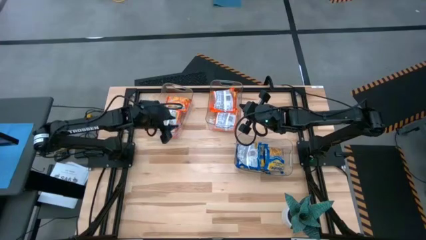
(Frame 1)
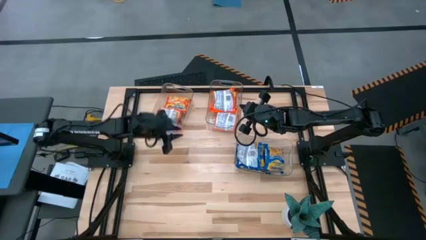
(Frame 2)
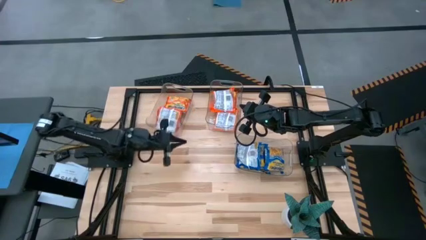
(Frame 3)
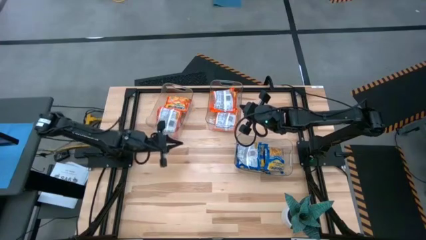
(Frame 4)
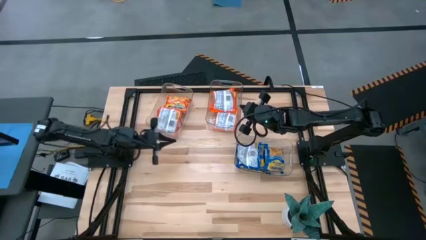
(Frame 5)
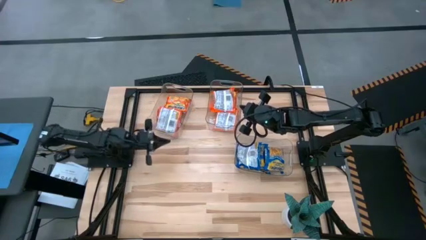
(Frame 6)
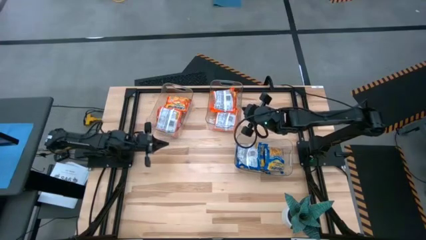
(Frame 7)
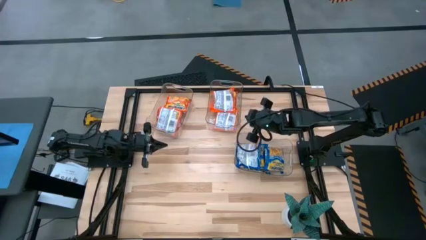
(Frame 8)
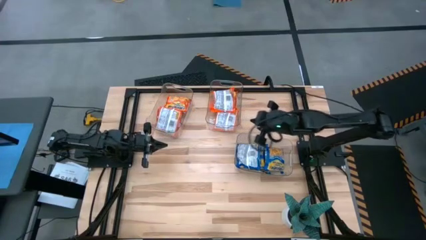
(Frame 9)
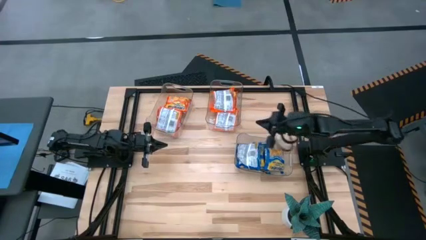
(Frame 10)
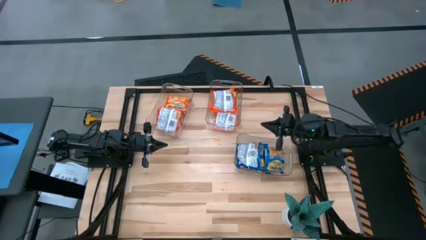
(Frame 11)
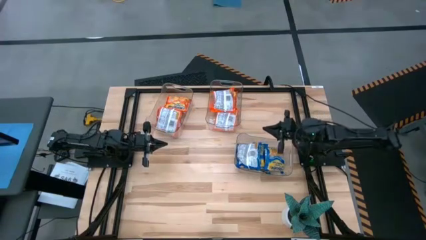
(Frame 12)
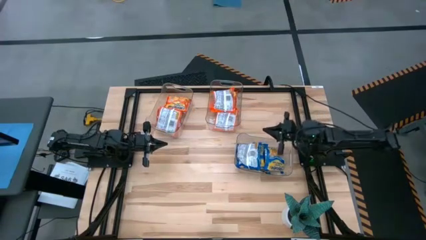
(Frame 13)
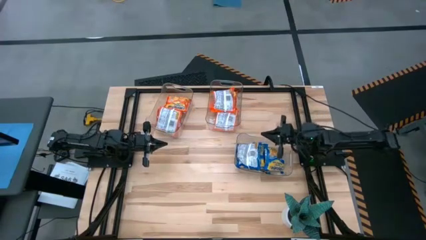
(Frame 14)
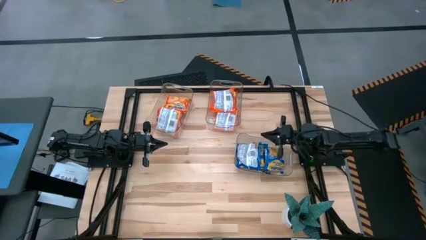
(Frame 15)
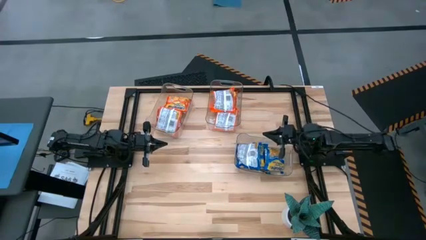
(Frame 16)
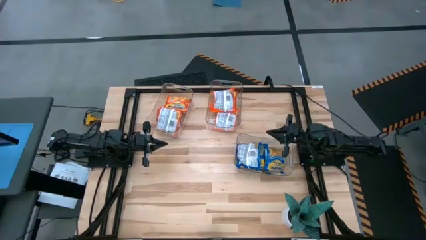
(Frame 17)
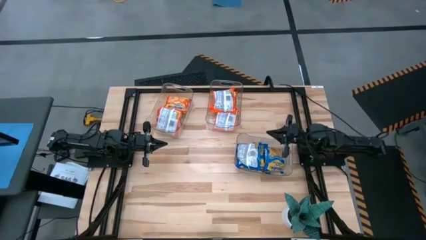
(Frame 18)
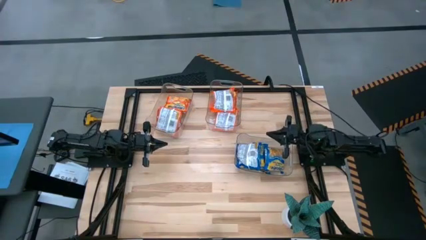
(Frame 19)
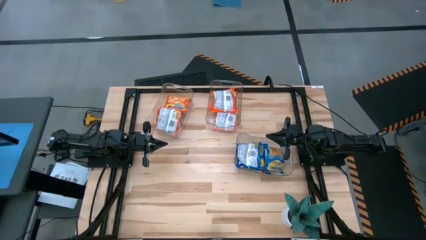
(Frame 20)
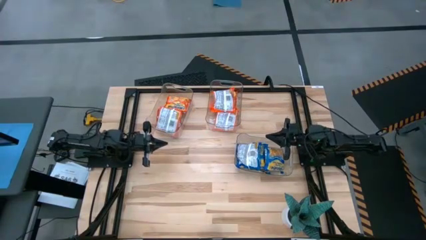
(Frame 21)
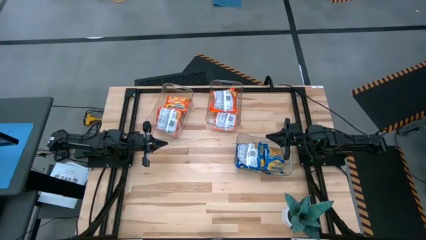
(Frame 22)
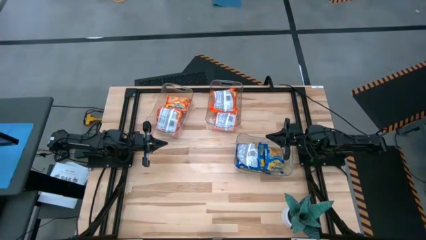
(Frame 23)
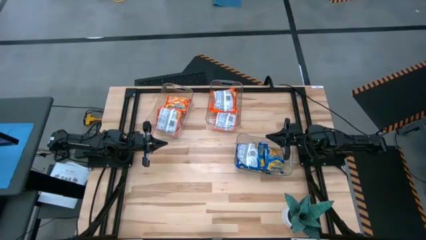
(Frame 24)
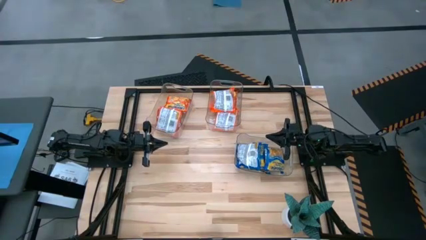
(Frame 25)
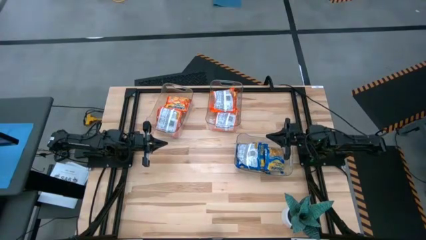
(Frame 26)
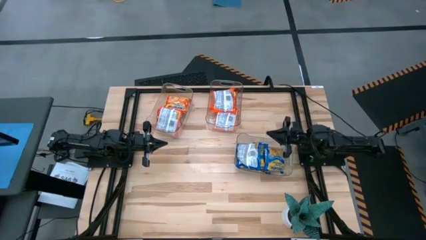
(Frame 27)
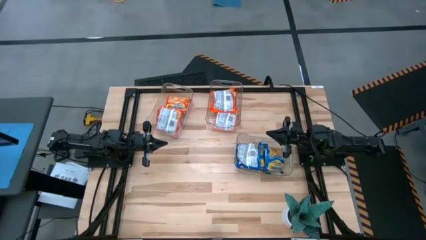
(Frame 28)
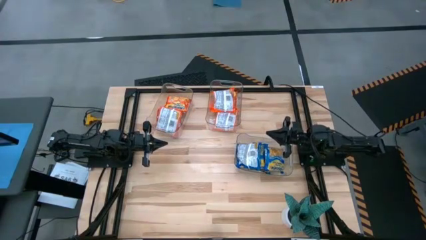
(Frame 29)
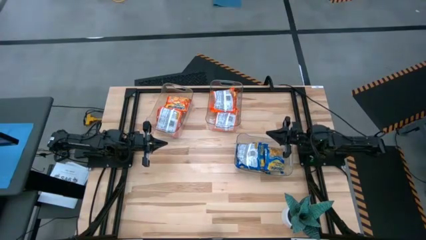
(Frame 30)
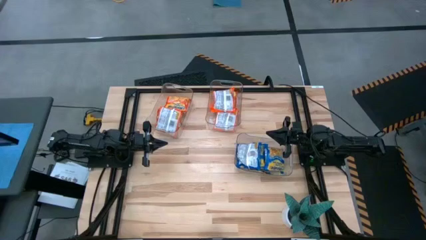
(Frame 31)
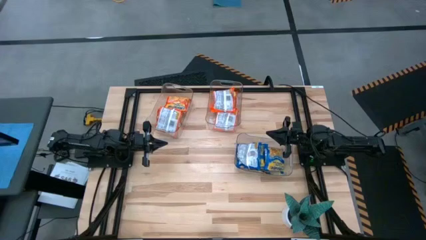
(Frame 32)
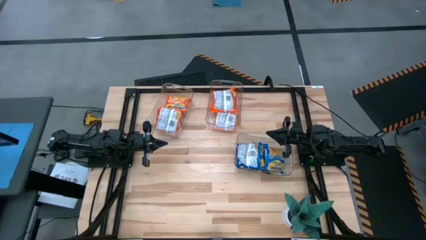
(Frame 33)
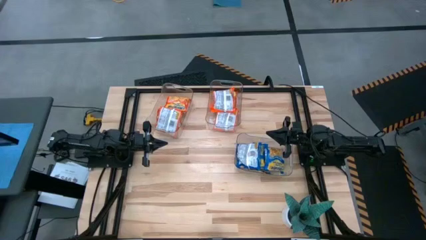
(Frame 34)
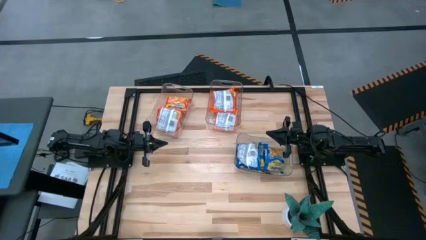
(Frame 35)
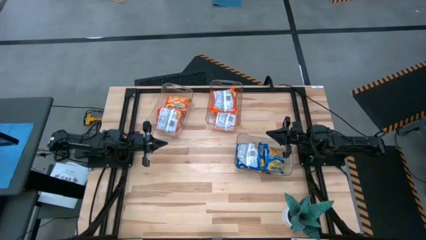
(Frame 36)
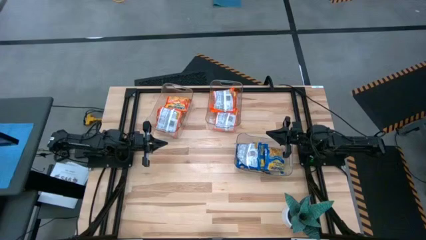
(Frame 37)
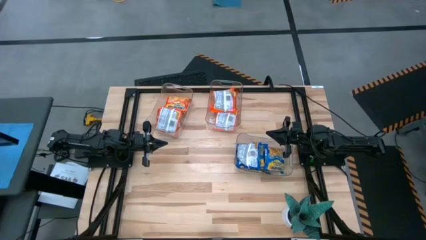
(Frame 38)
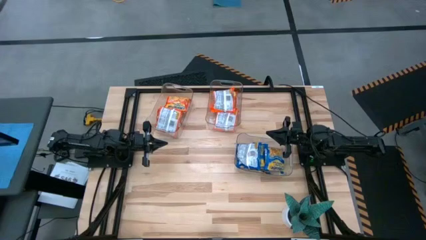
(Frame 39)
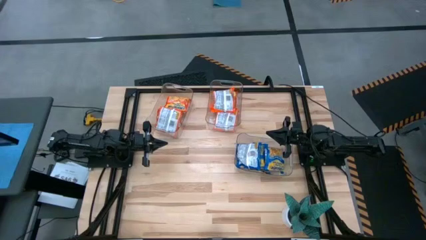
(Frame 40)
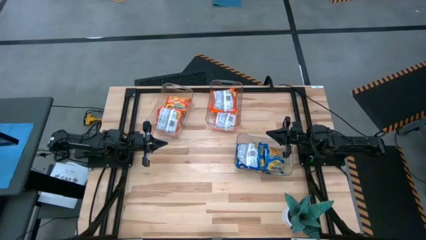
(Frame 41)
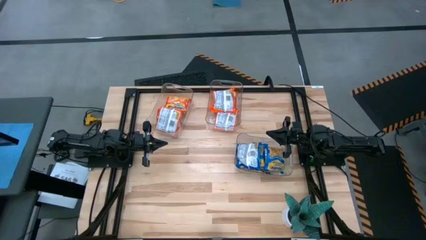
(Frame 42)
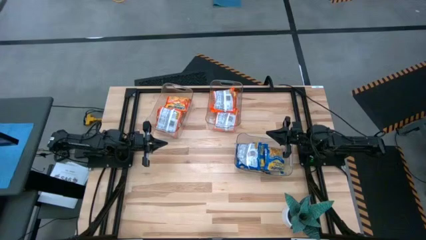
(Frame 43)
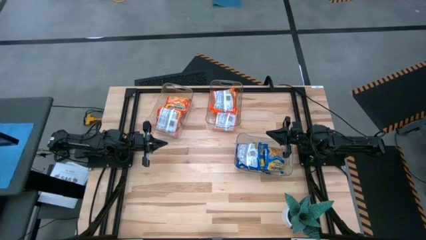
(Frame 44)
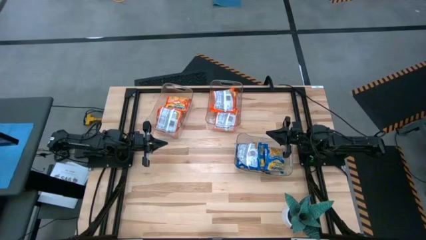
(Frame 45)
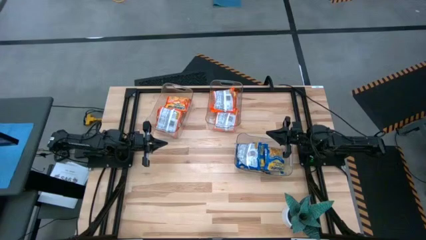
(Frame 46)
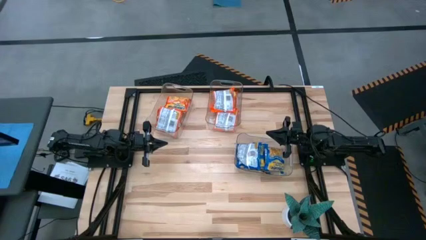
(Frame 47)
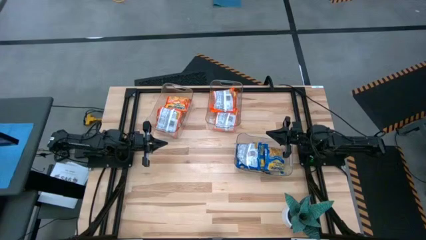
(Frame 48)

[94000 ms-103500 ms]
Task: Sort Maruchan noodles
Return to Home Position

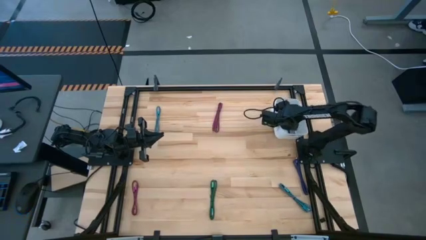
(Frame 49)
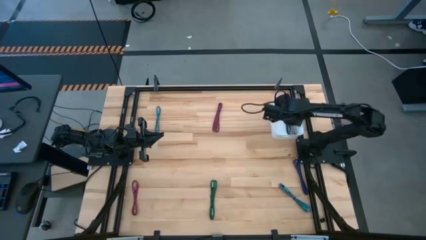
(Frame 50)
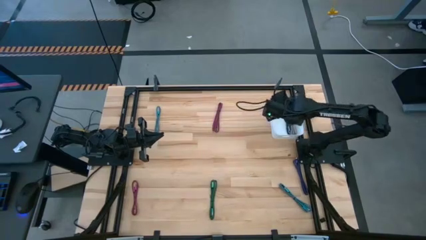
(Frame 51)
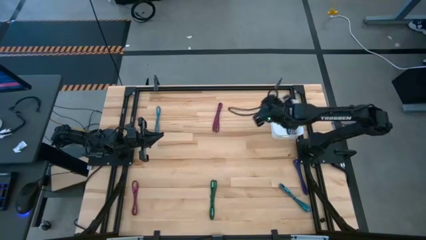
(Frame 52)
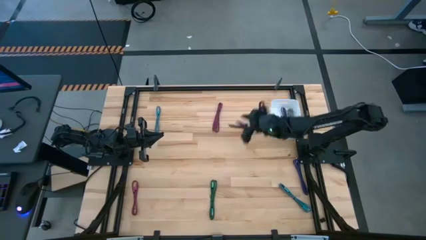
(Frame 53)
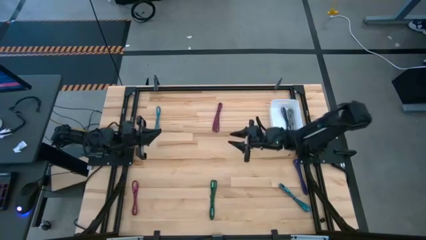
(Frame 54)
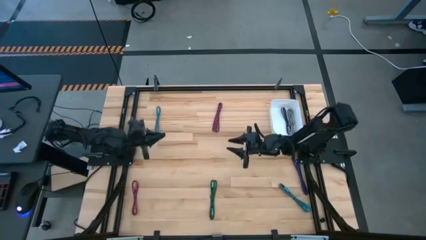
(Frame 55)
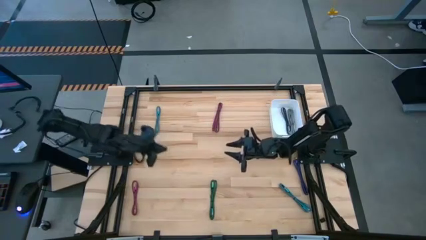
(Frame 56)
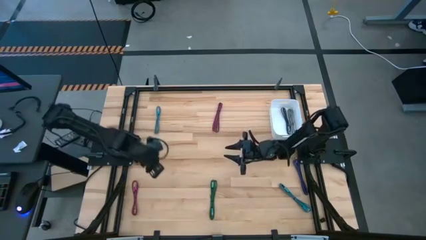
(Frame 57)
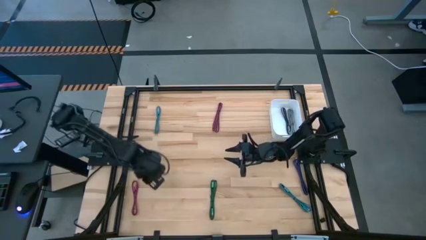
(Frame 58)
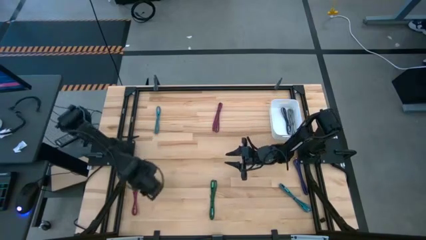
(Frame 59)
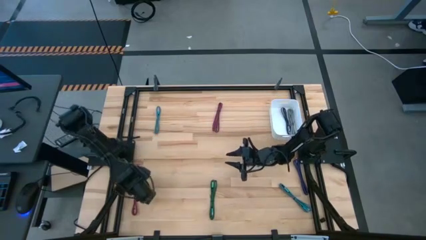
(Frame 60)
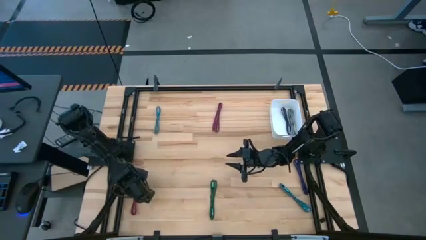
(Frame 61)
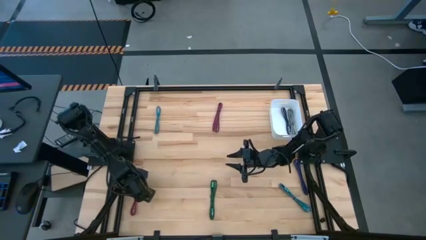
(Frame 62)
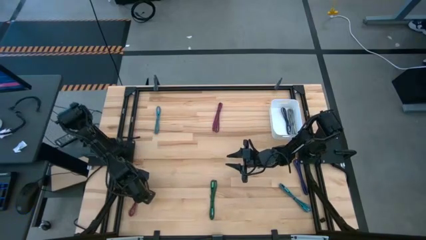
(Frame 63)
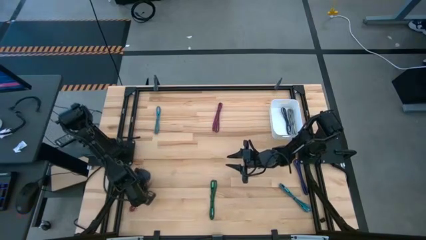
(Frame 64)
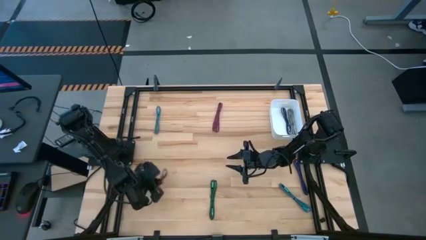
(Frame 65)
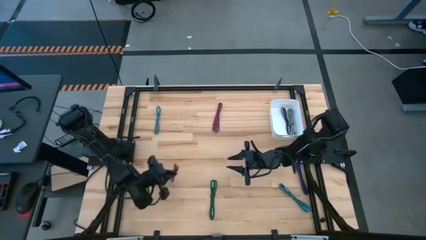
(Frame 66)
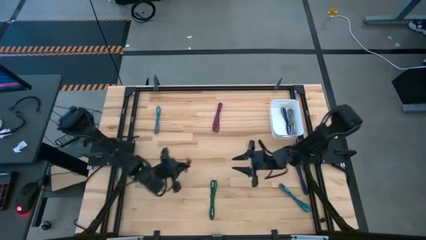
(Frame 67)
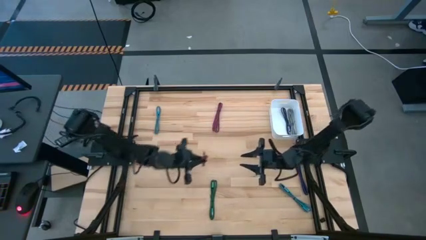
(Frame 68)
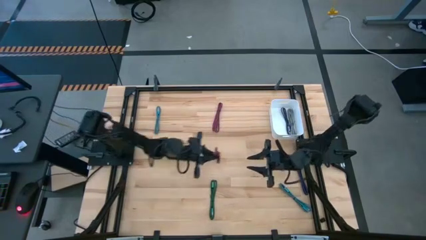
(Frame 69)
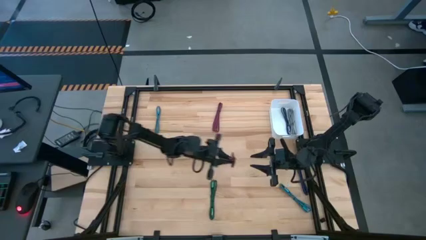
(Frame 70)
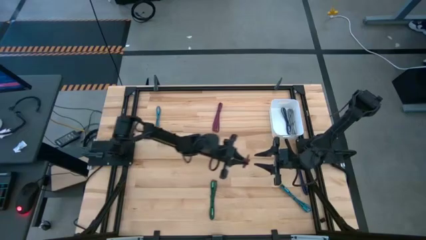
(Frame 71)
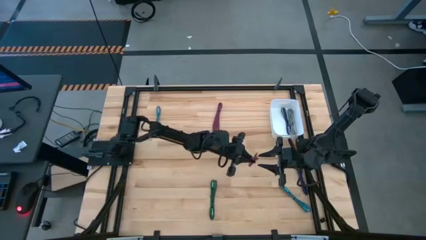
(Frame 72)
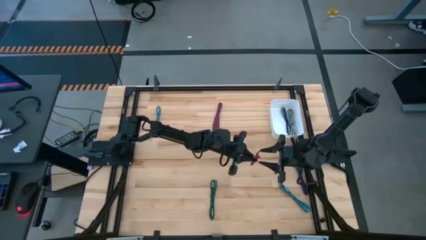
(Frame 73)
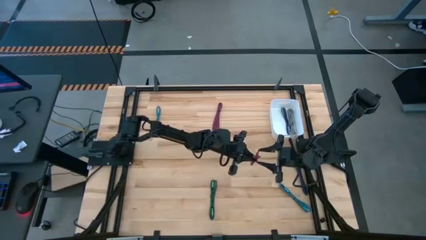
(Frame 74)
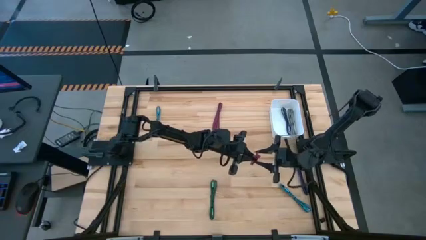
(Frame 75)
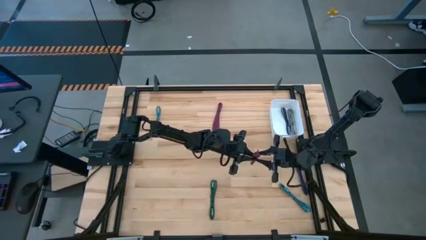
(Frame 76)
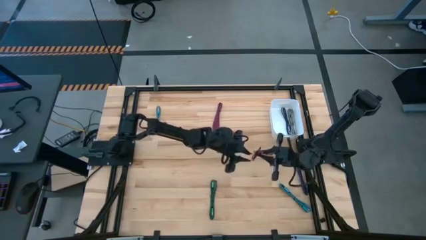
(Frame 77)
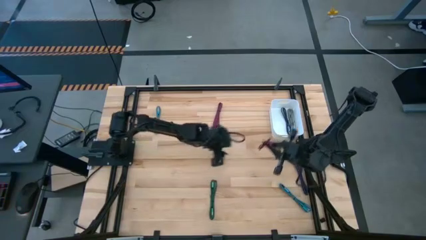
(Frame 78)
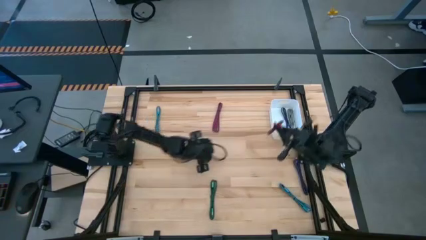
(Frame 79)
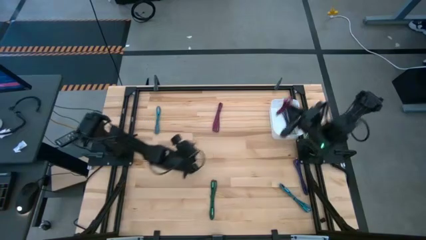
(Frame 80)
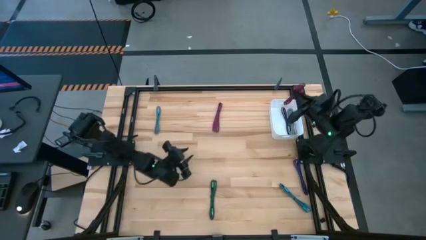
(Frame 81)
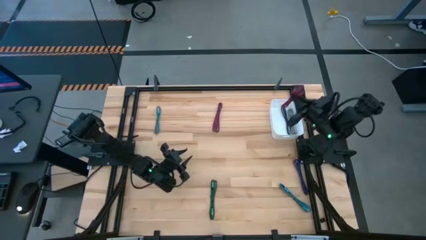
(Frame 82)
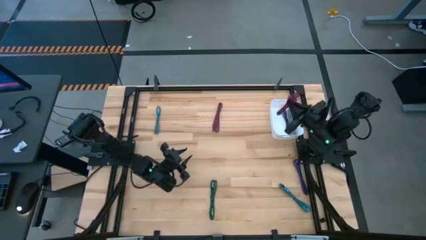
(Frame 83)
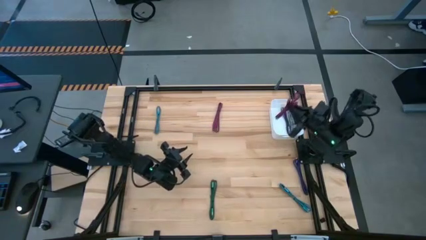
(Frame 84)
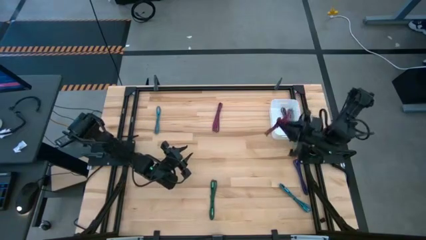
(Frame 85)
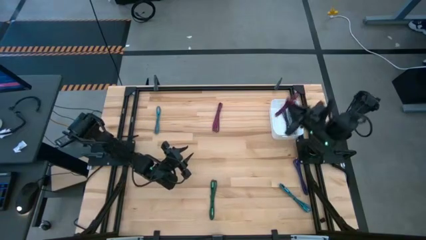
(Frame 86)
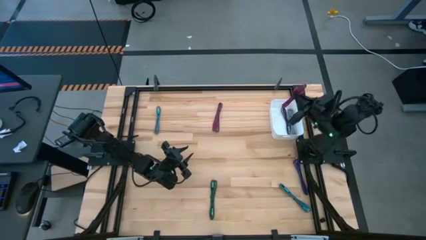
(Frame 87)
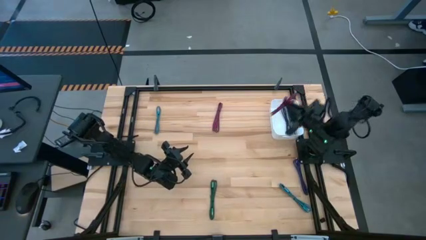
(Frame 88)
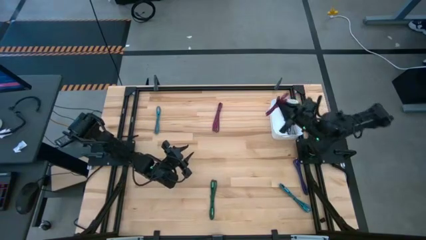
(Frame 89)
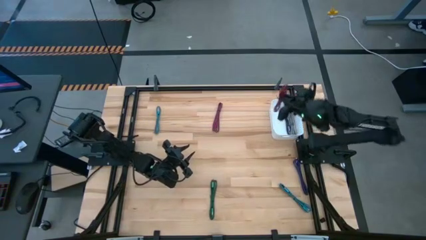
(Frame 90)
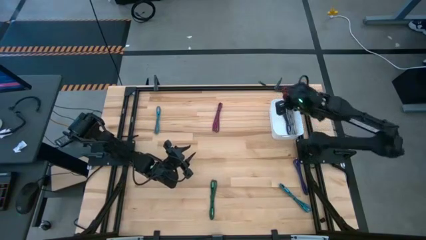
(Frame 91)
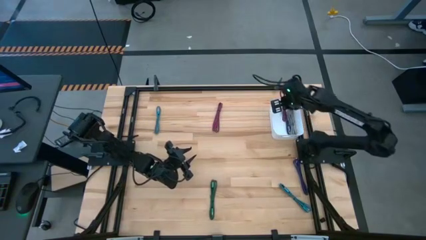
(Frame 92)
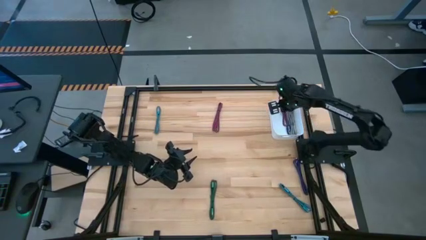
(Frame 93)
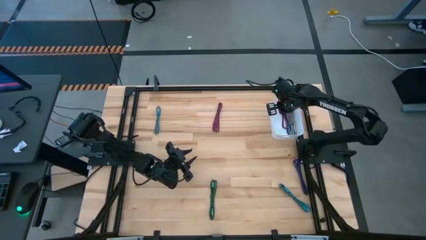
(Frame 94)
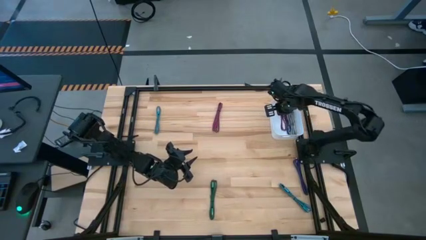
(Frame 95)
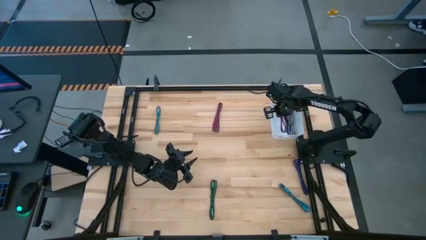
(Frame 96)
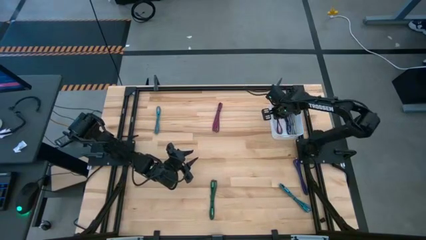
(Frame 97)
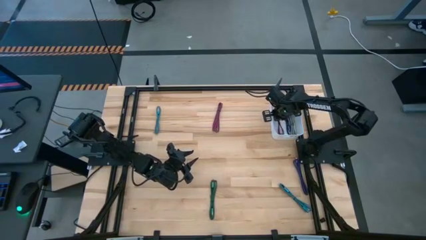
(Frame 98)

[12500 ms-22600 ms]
Task: Pick and place USB-C Cables
Put the bottom pink charger cable into the white bin
